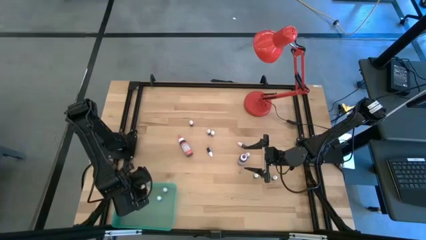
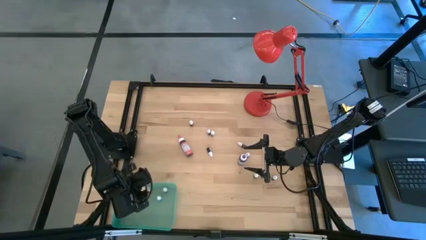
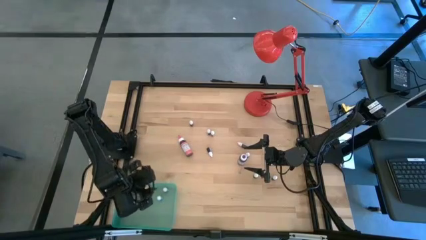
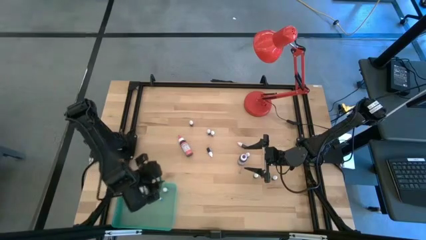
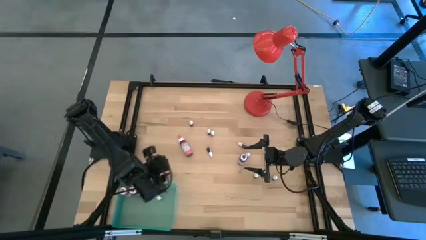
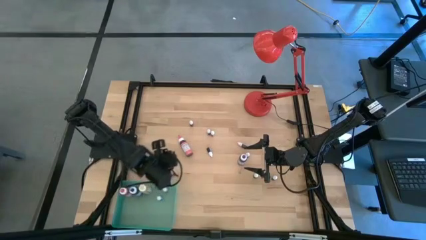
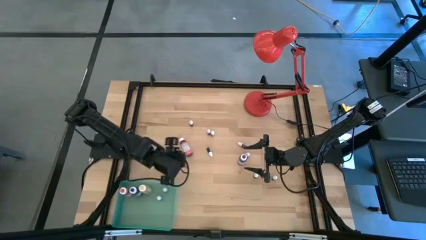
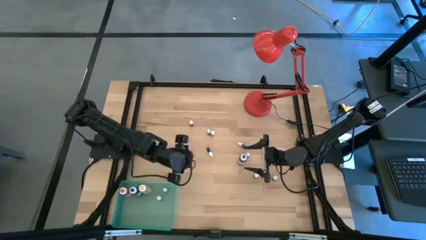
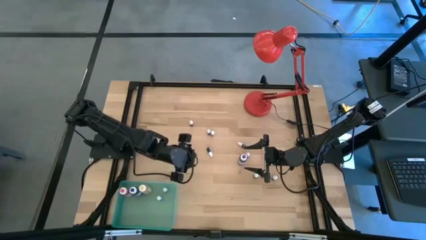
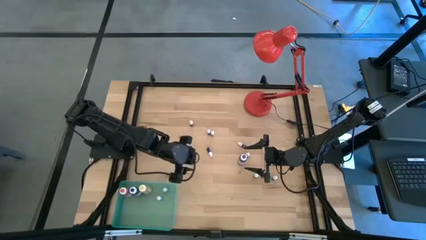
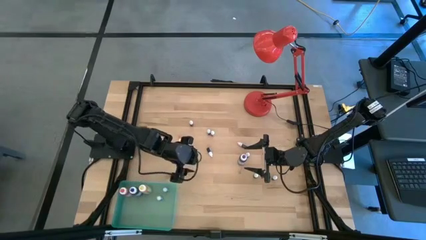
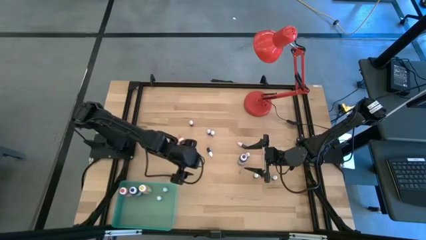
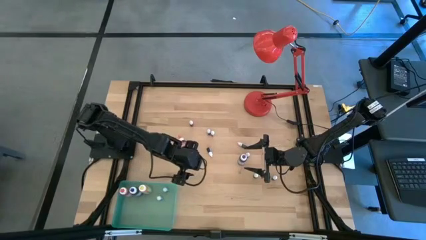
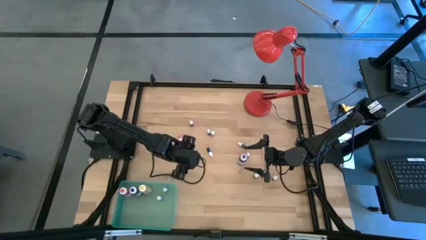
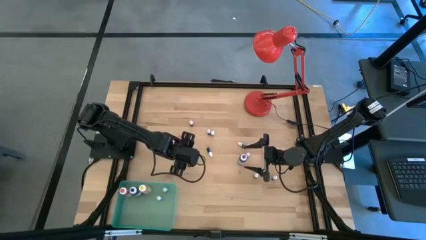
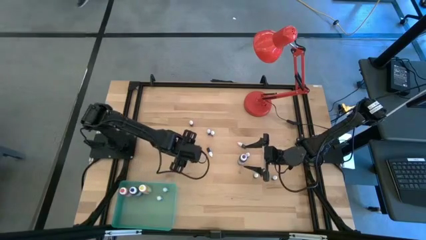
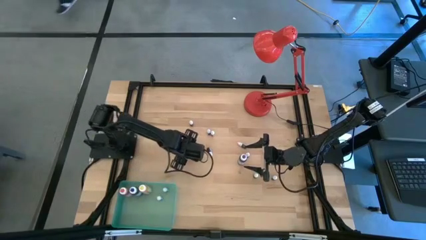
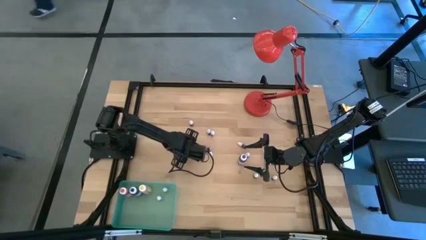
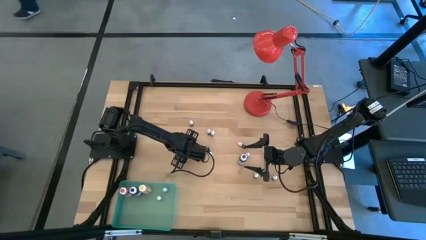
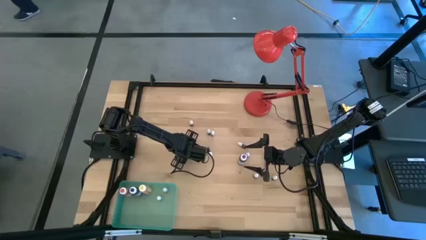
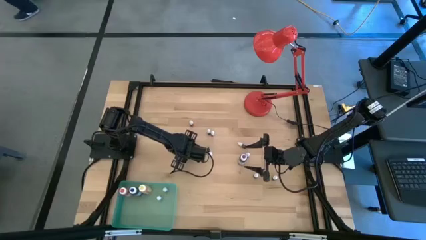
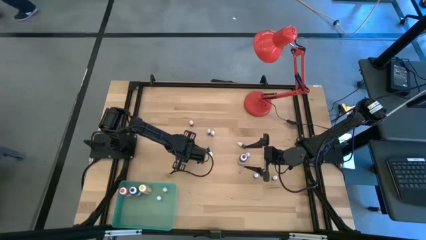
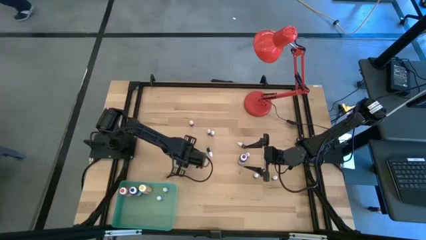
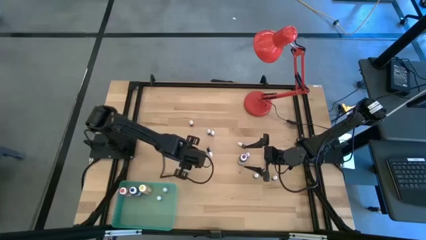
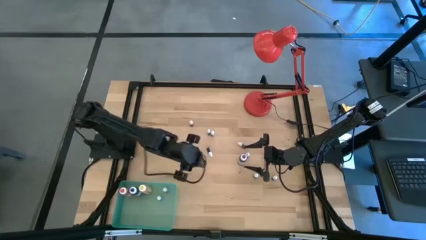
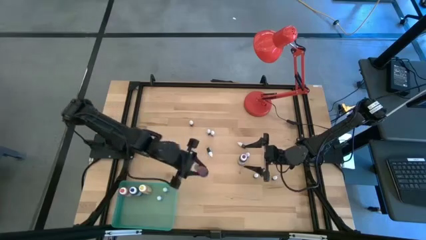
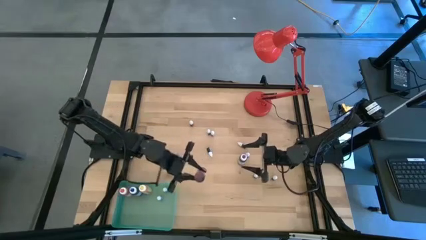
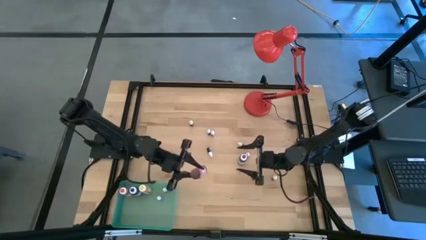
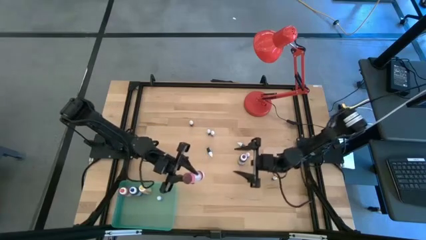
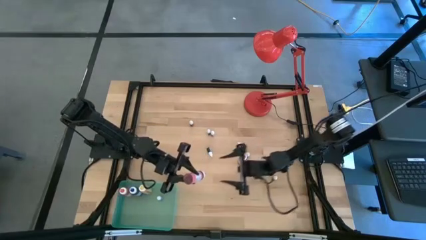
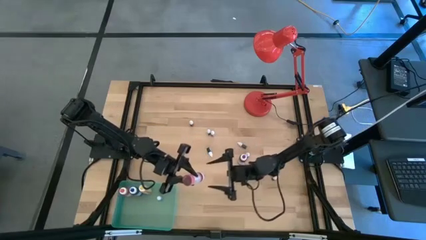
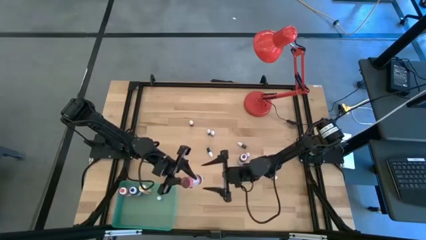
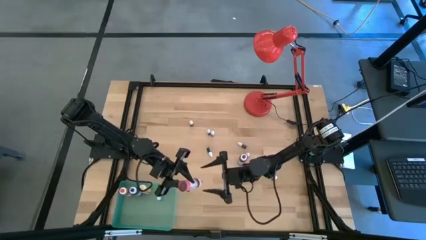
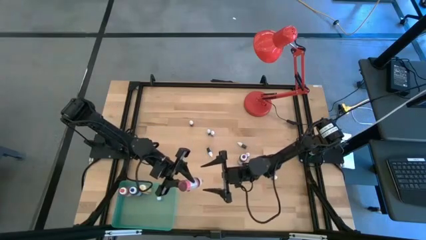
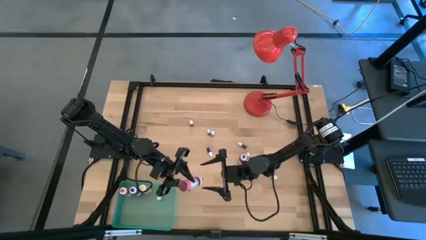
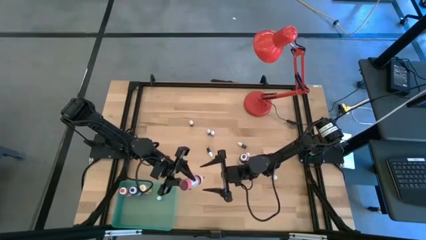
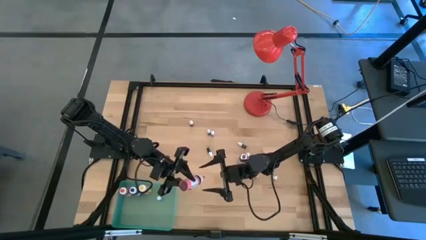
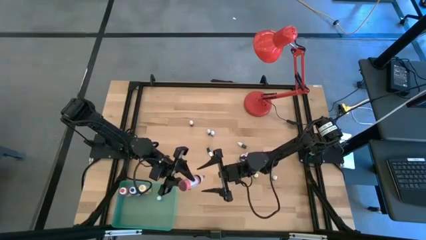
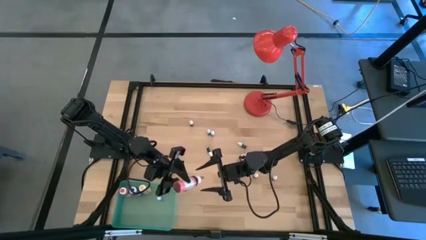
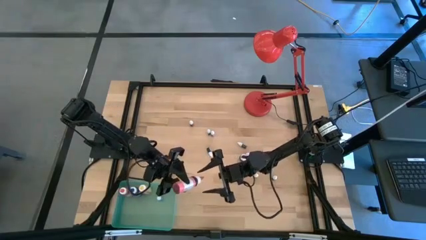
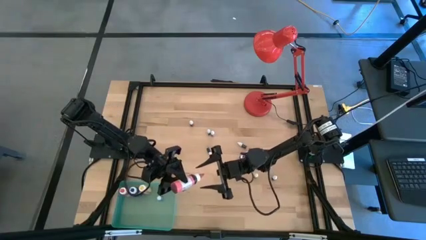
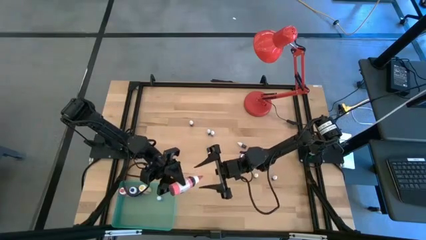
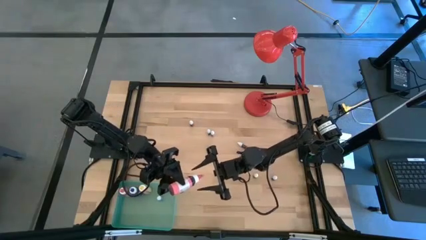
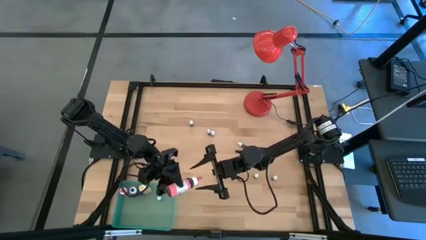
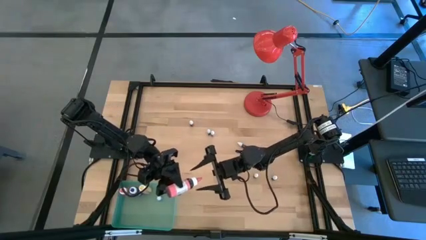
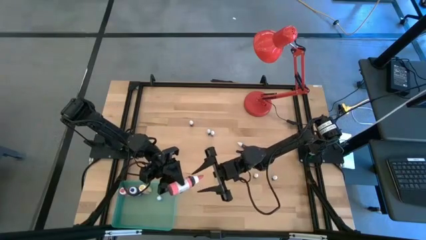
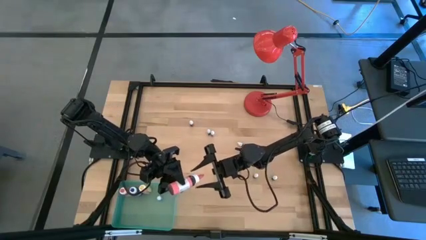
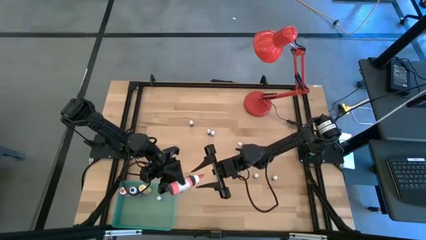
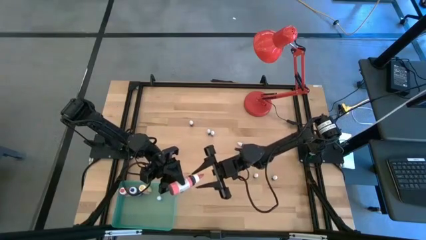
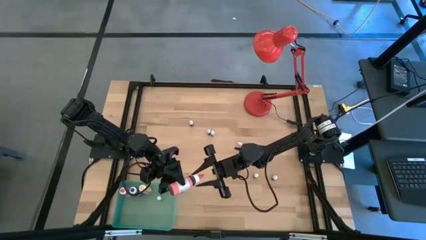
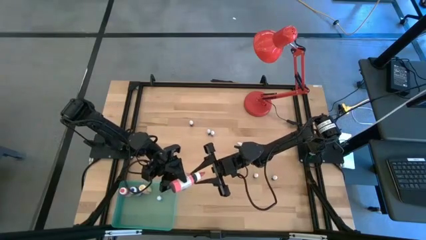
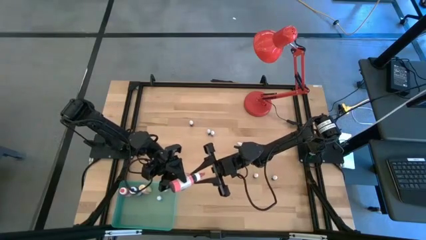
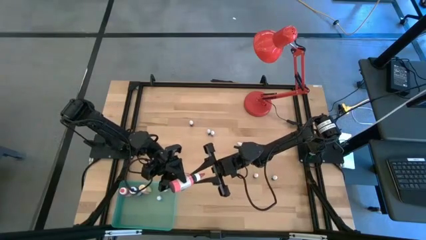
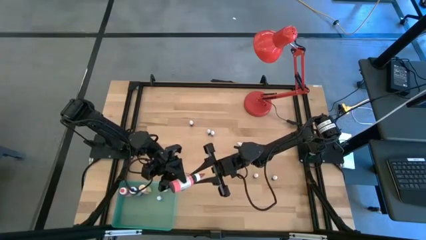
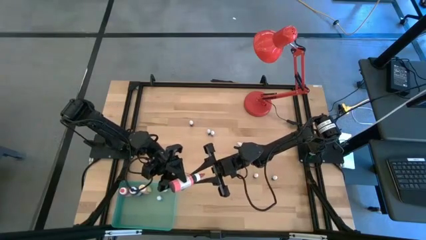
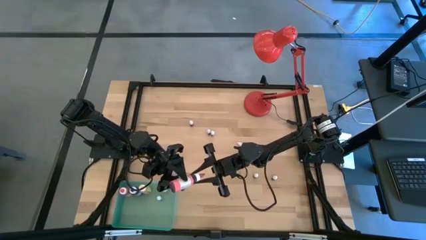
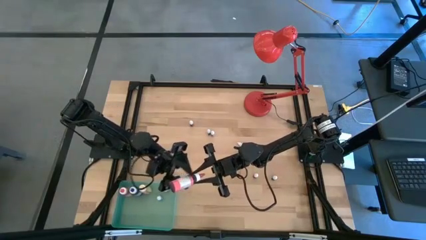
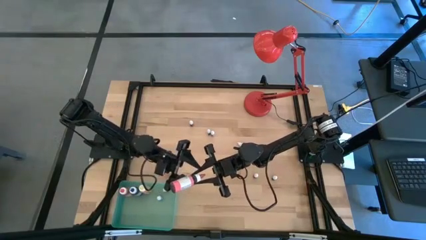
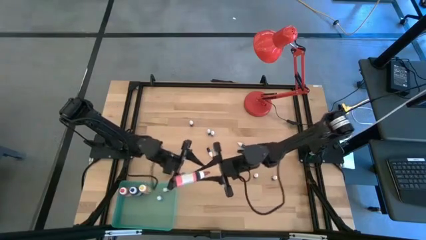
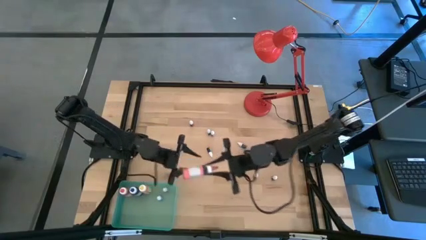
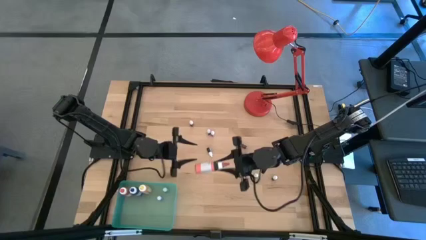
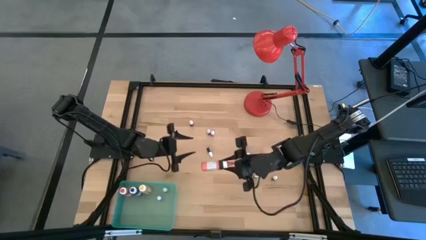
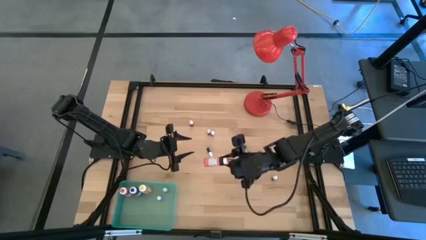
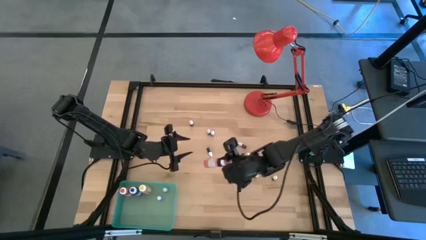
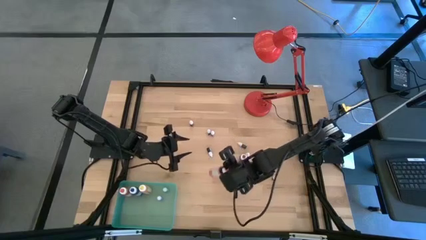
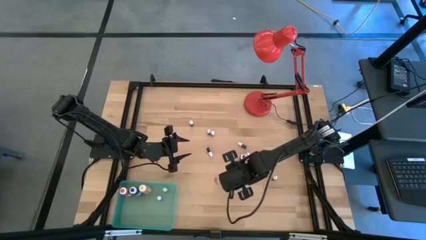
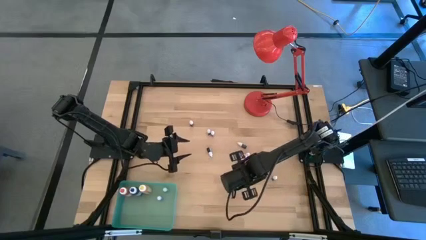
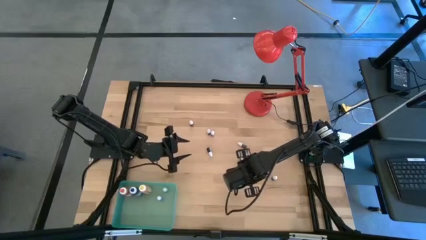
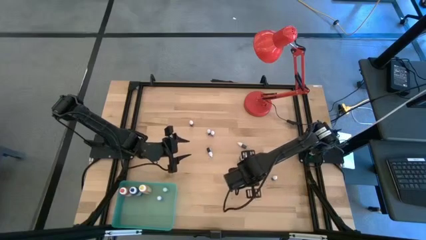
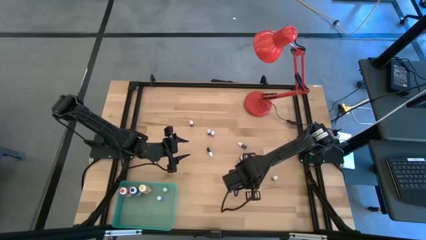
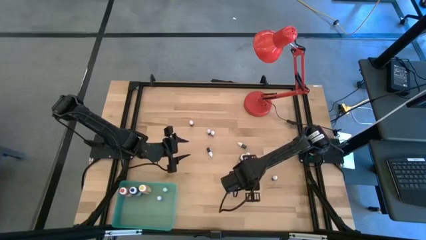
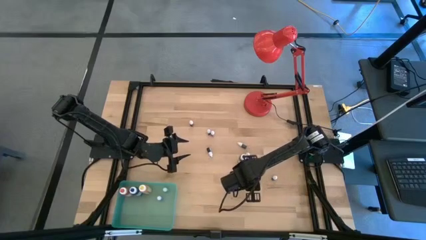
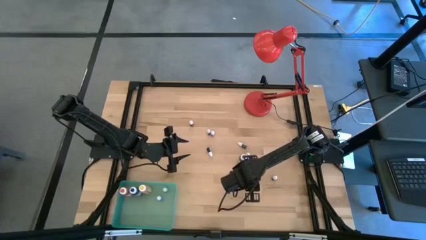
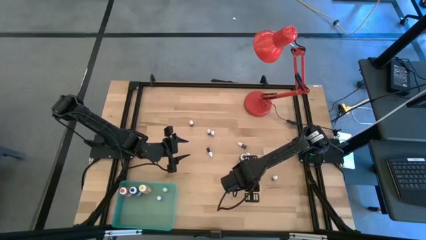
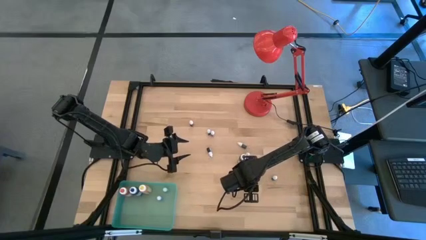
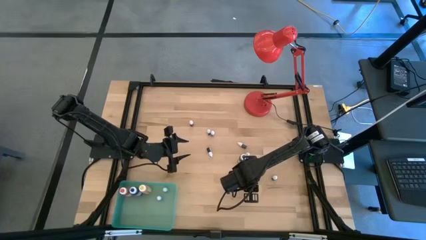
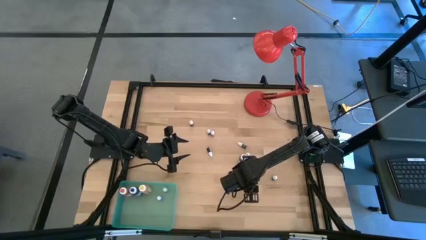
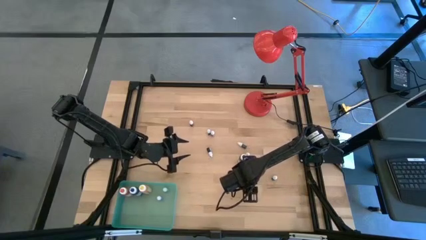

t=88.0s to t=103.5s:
Task: Pick & Place food coloring
Put the red food coloring into the blue bin
